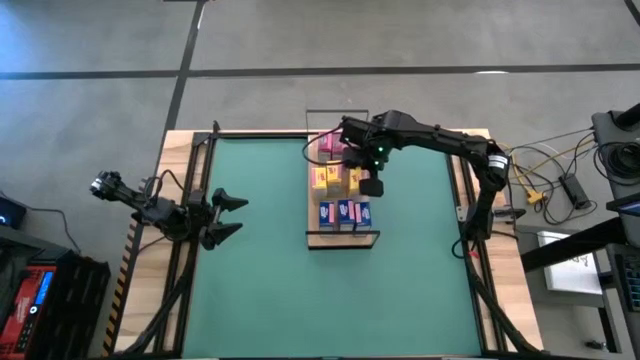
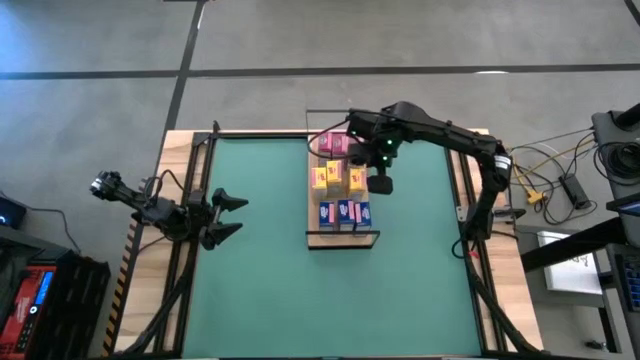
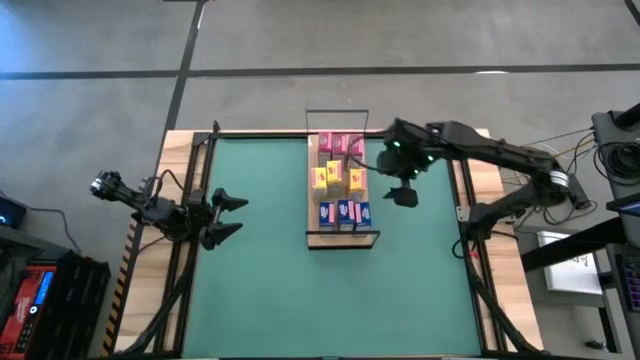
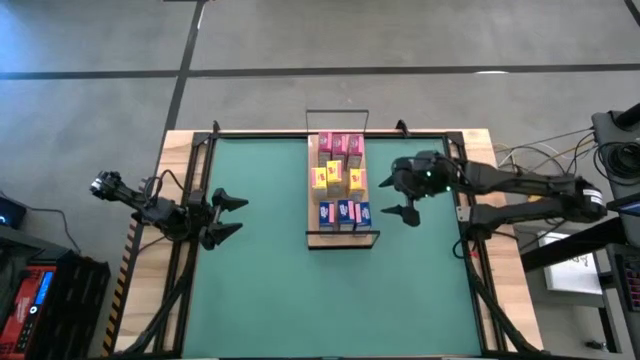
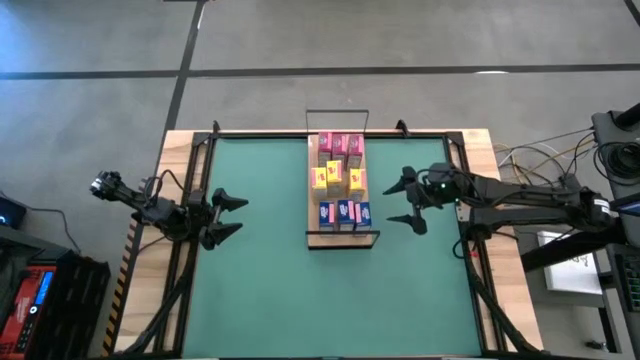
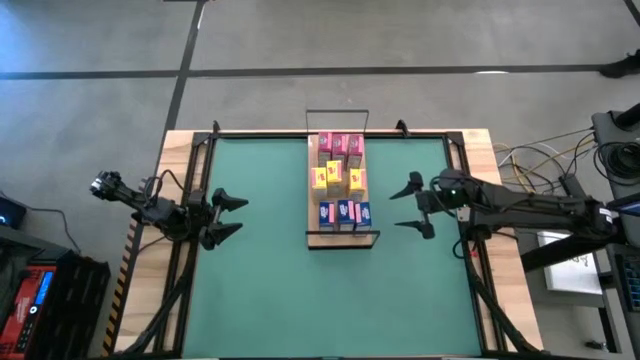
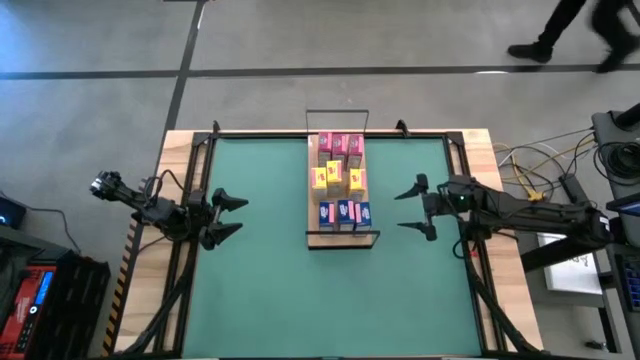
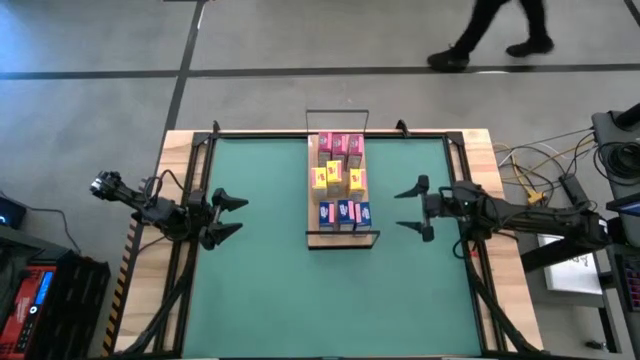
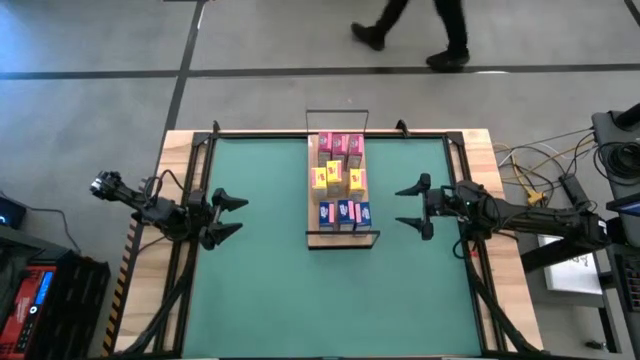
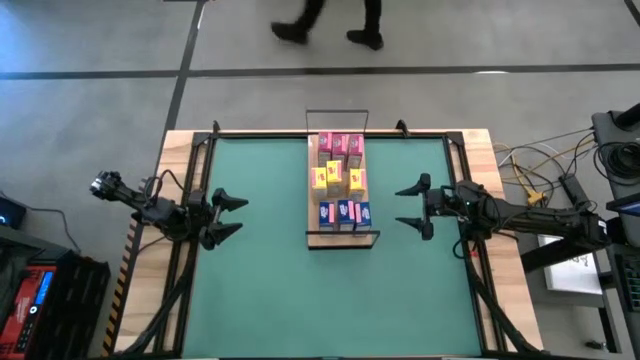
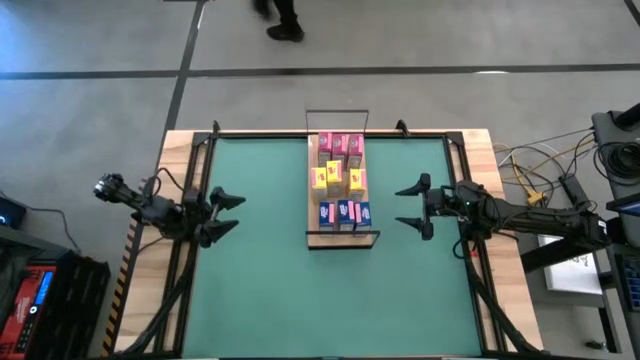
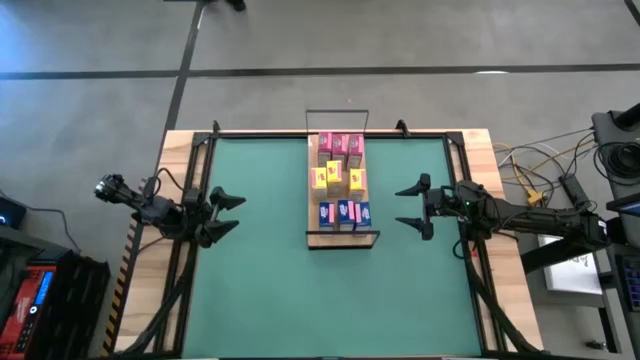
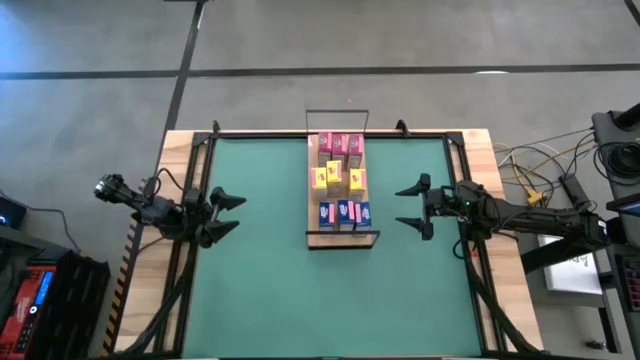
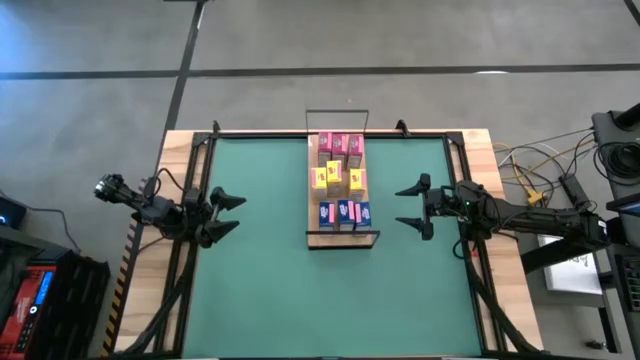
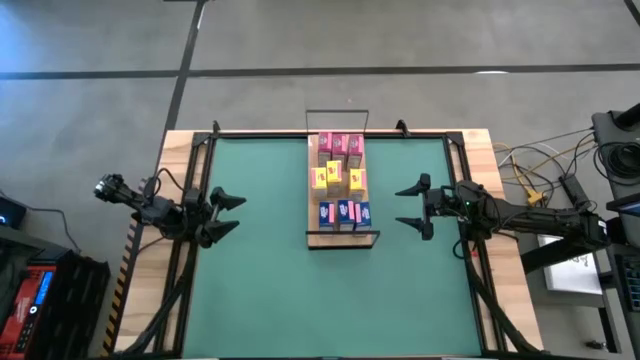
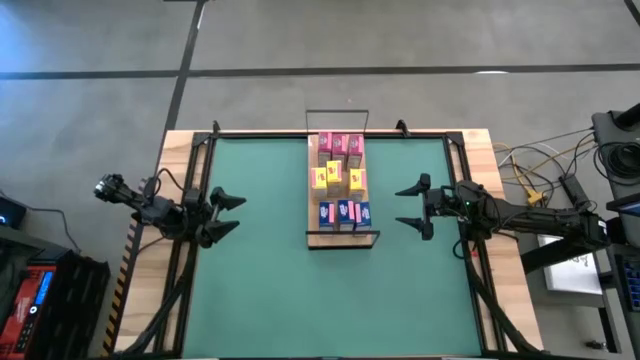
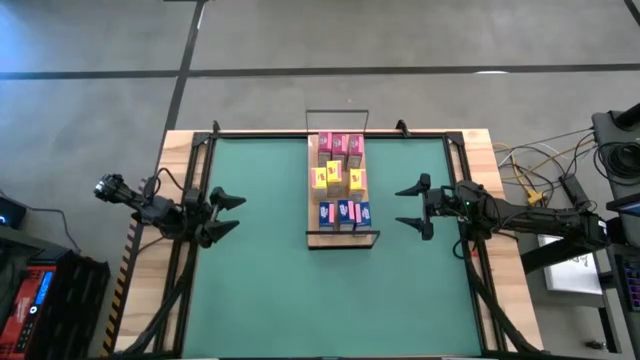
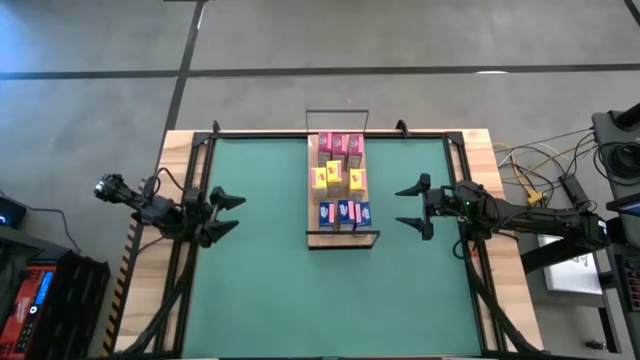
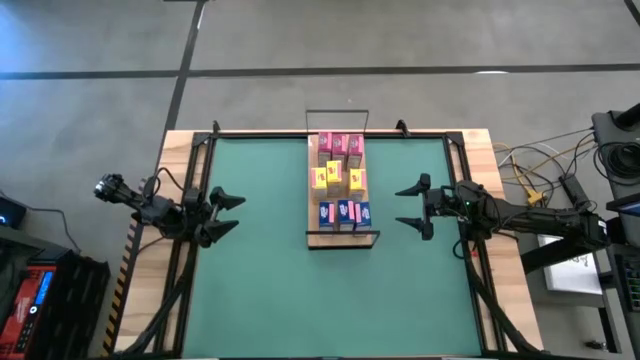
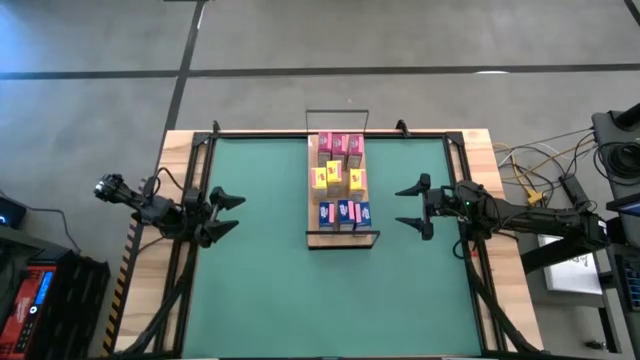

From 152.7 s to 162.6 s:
Task: Stack cereal on shelf
Return to Home Position

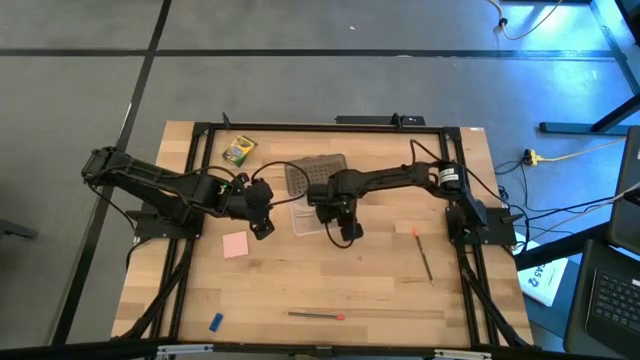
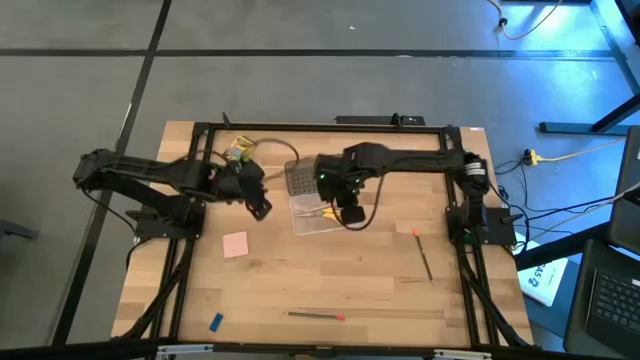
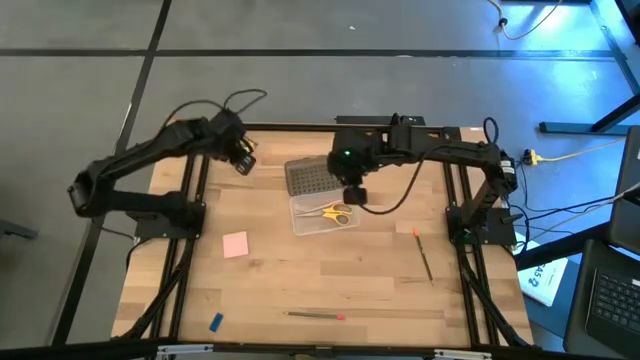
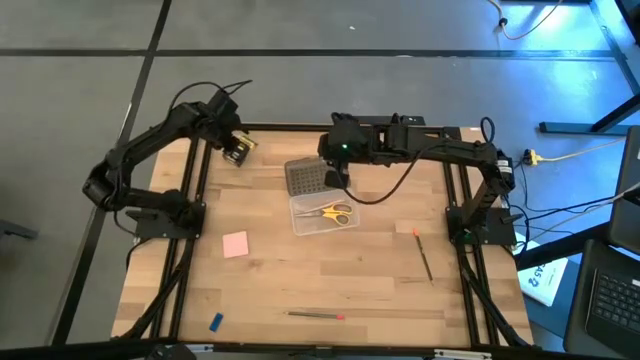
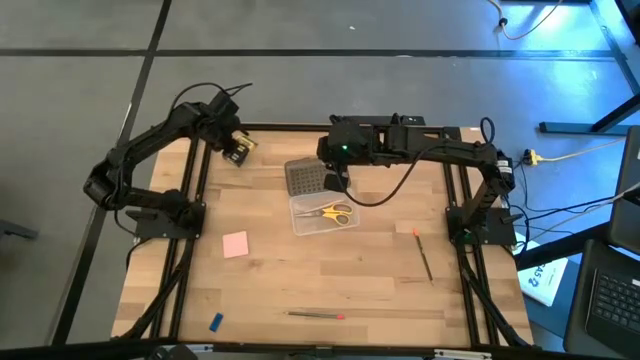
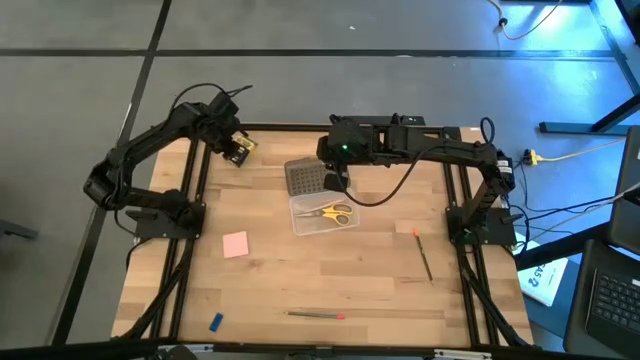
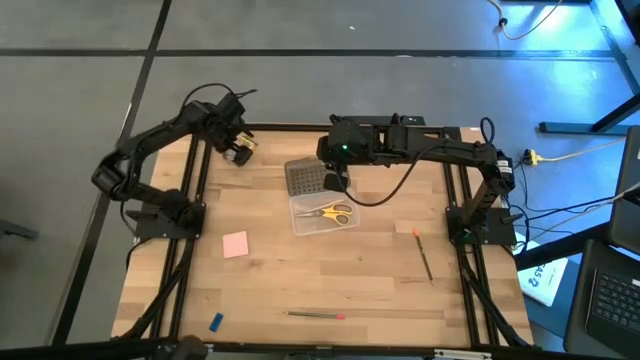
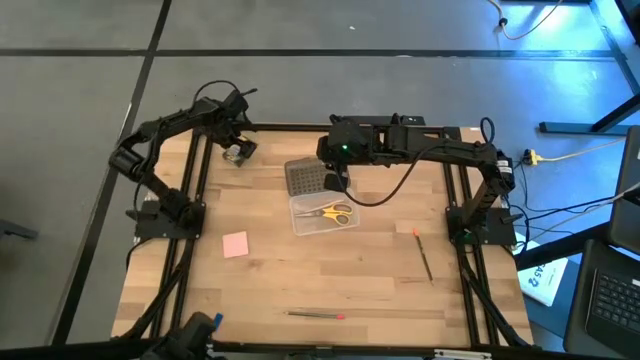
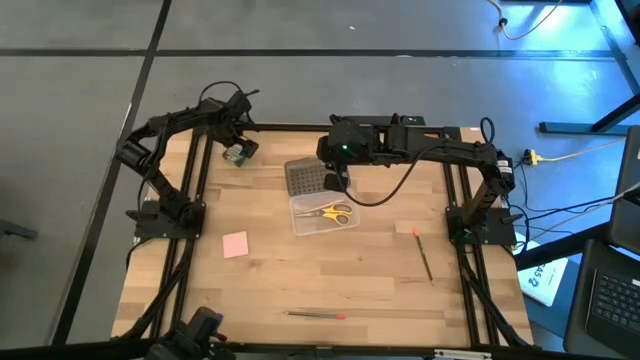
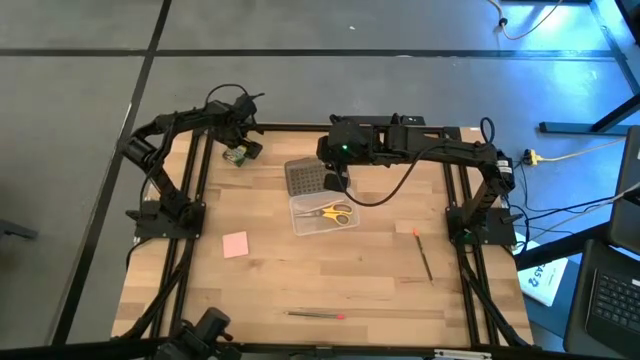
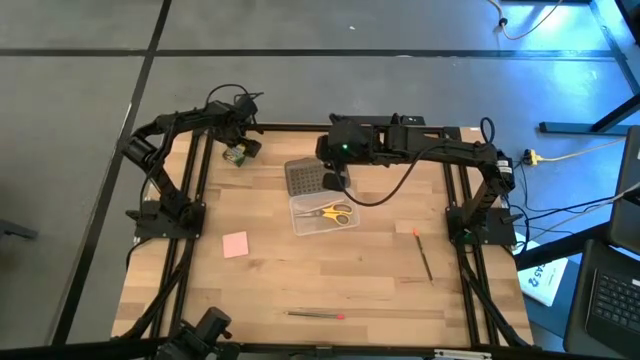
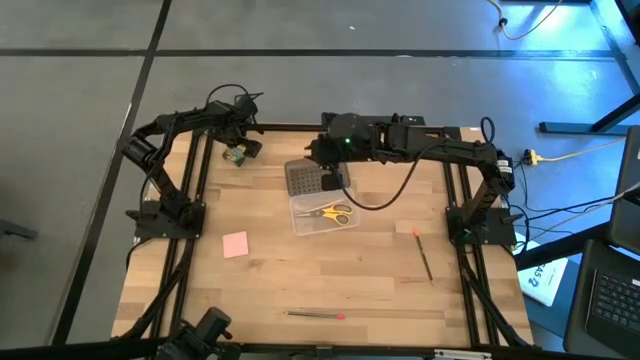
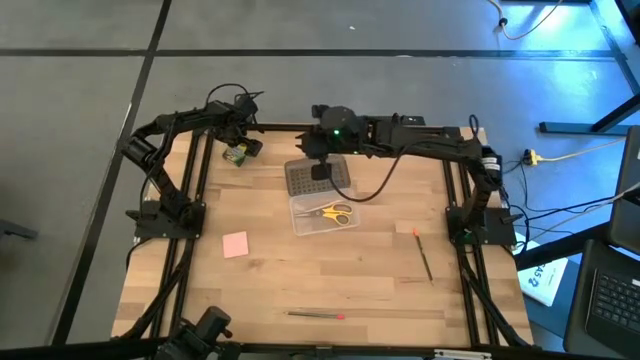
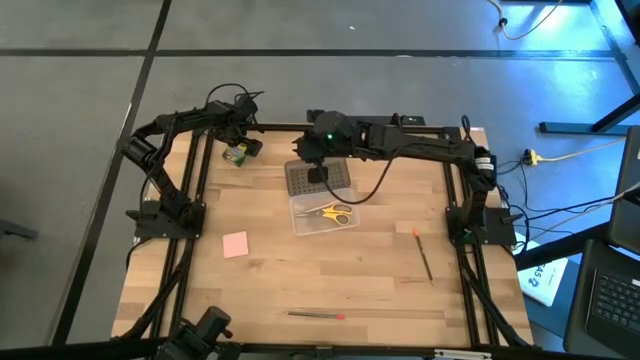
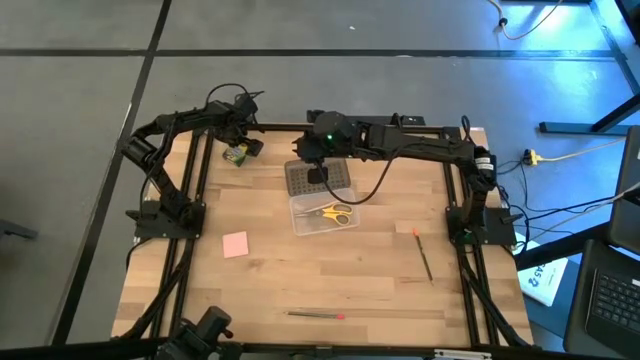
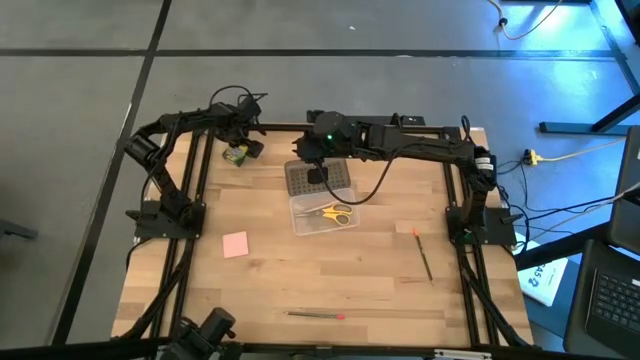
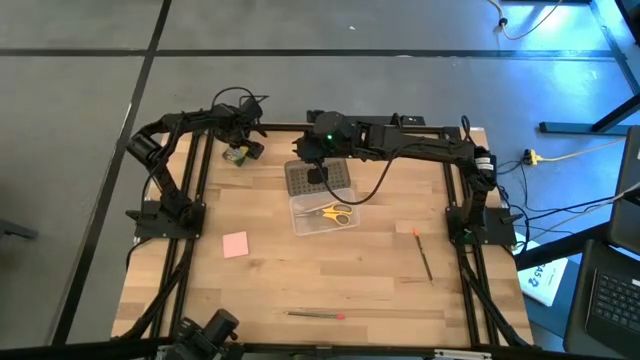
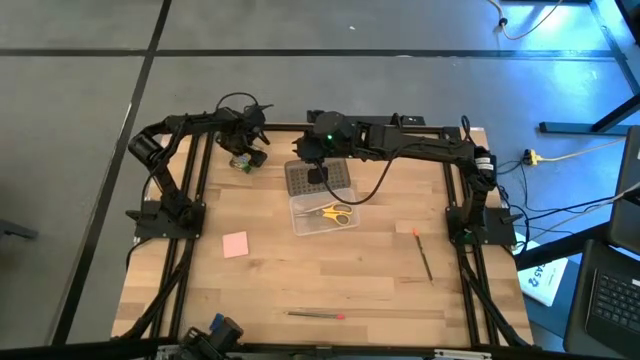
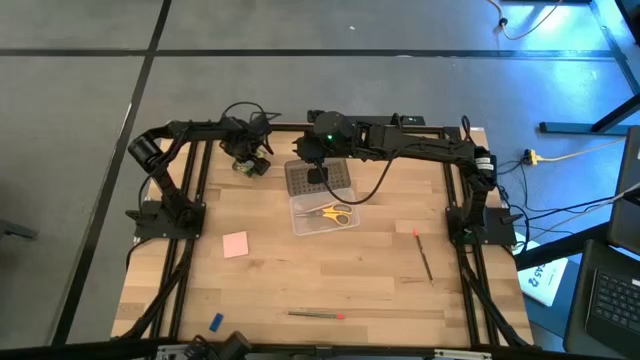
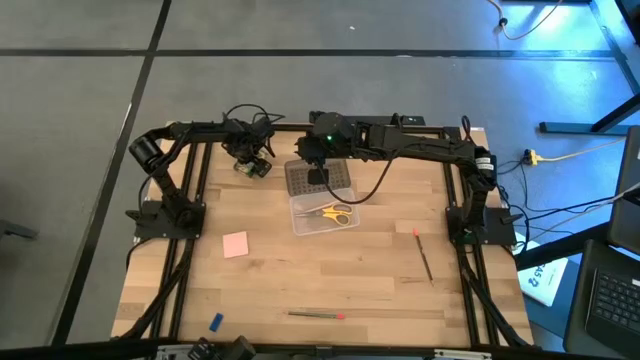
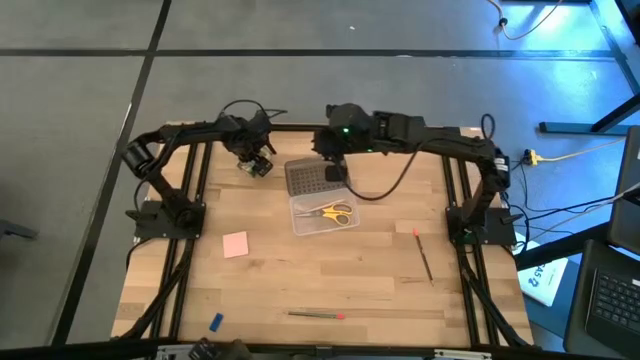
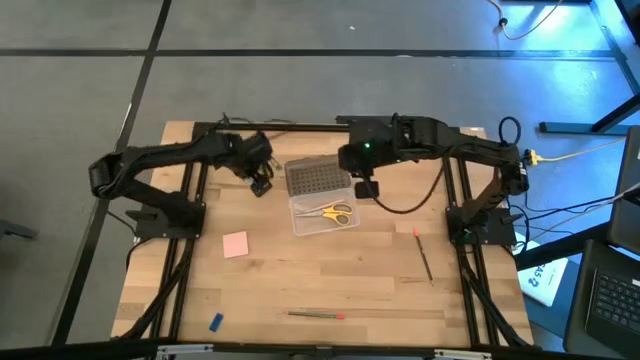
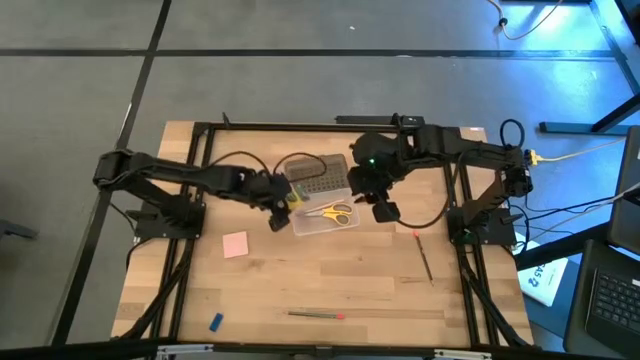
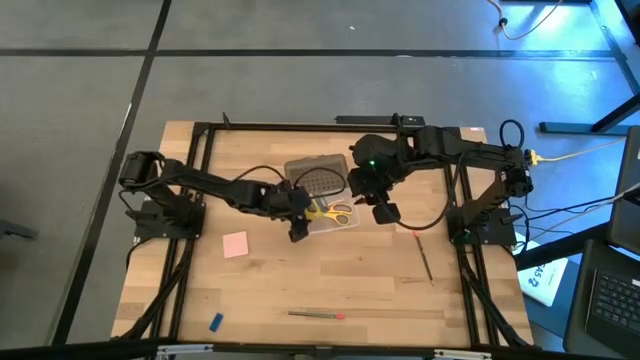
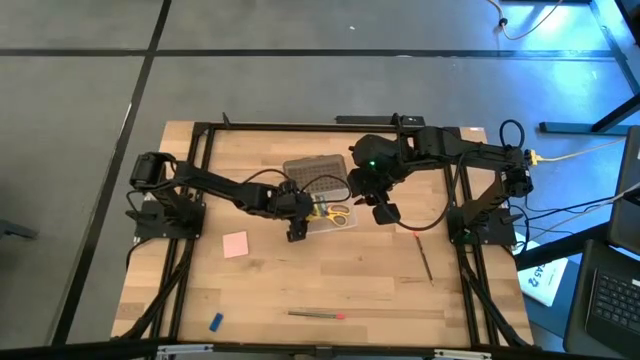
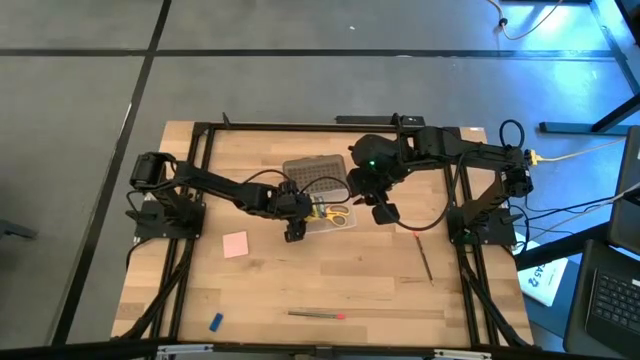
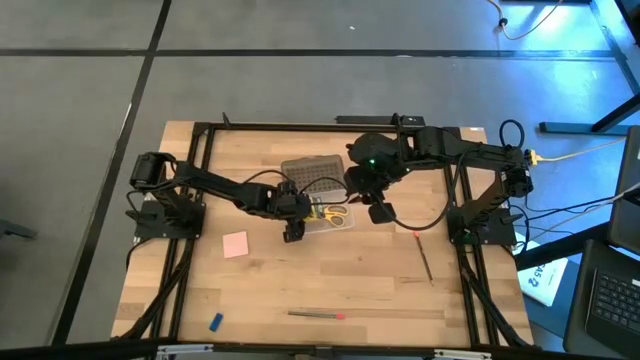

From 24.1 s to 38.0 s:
Task: Pack school essentials
Put the orange crayon pack into the black supply box
